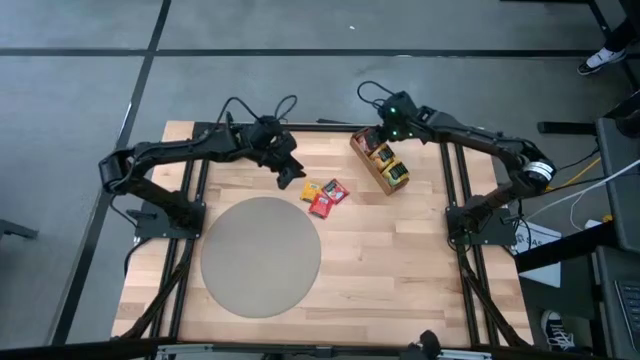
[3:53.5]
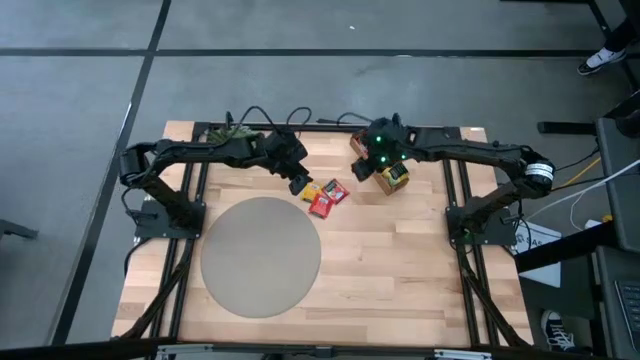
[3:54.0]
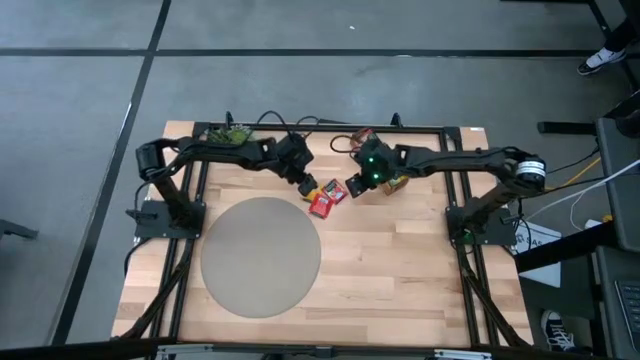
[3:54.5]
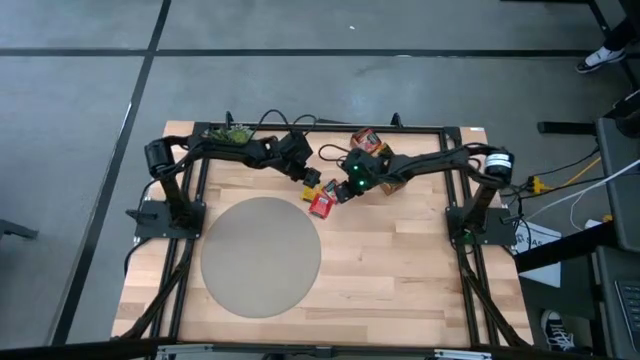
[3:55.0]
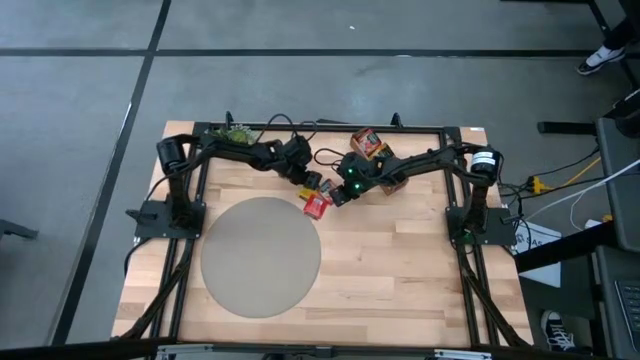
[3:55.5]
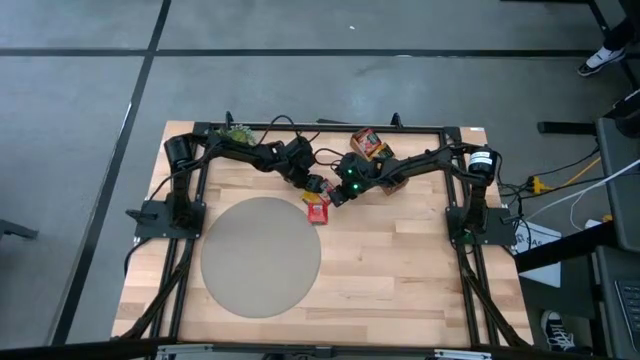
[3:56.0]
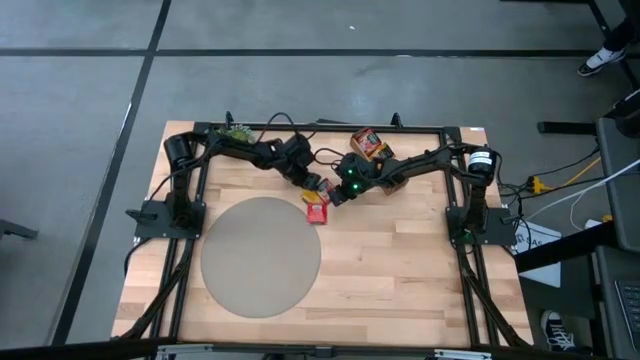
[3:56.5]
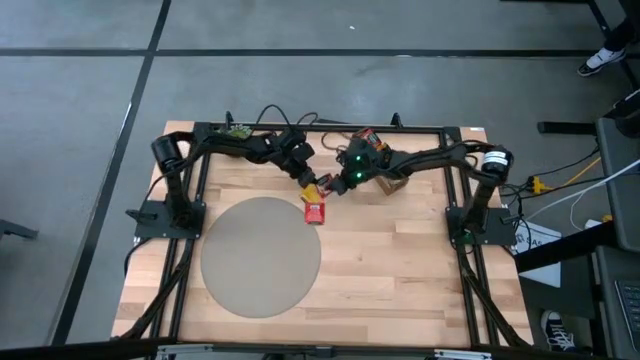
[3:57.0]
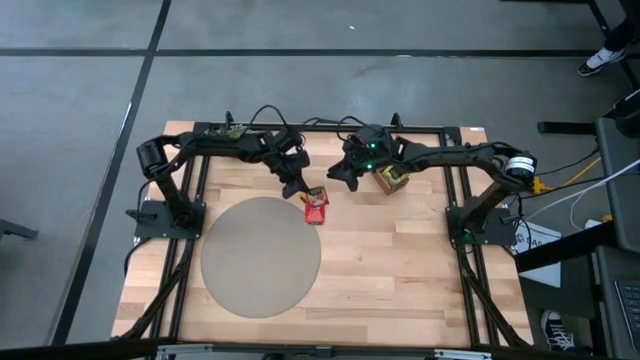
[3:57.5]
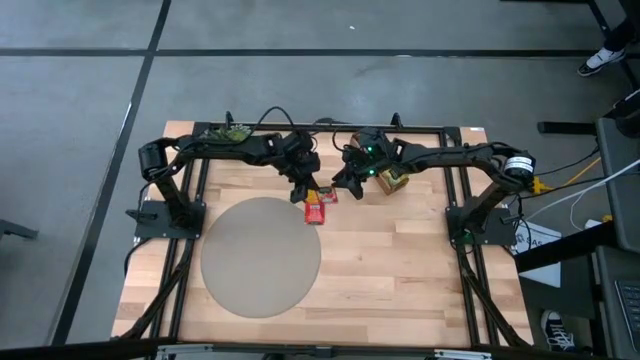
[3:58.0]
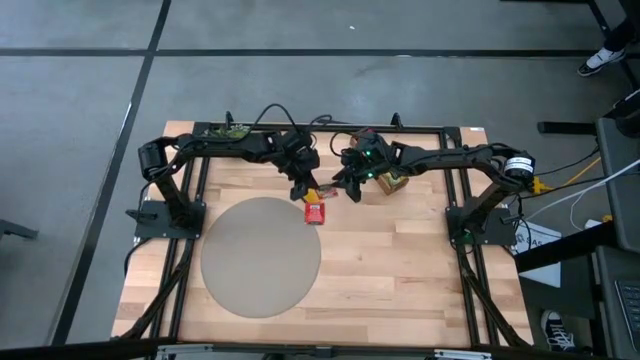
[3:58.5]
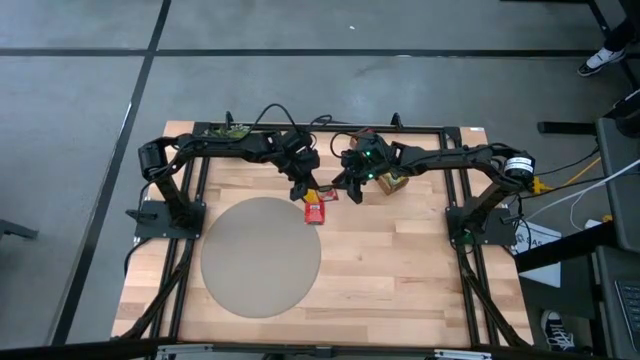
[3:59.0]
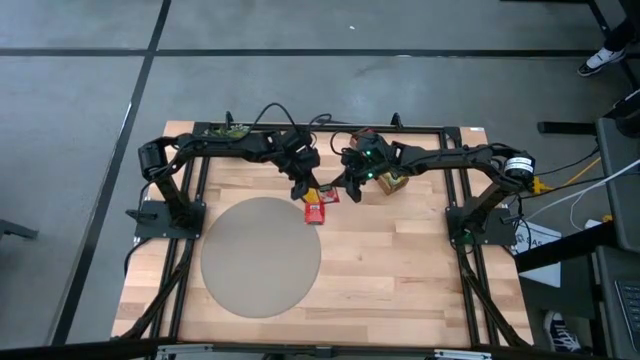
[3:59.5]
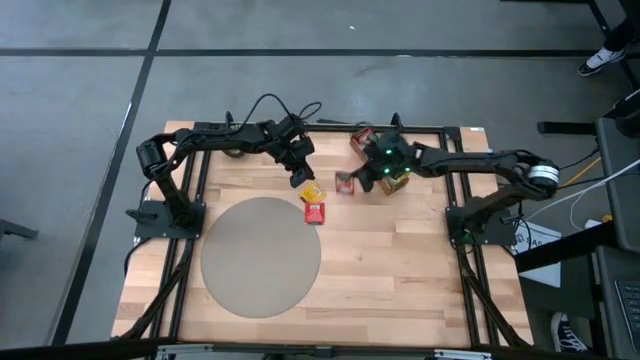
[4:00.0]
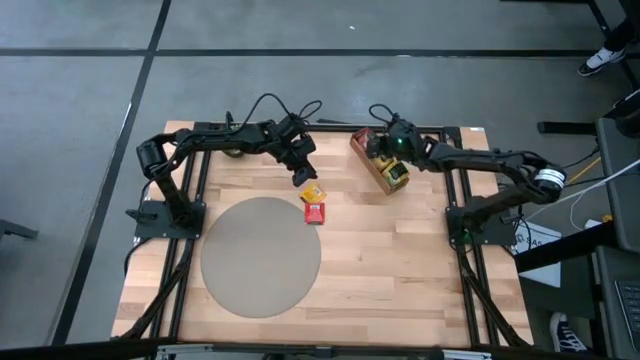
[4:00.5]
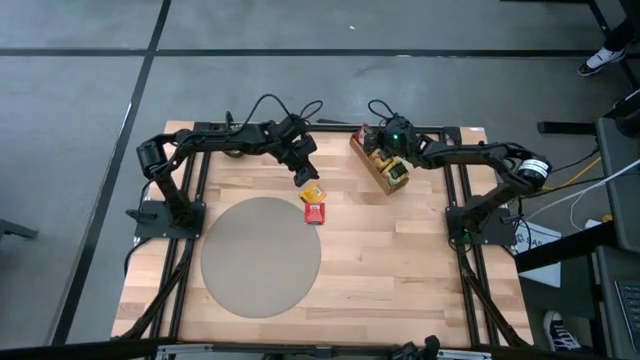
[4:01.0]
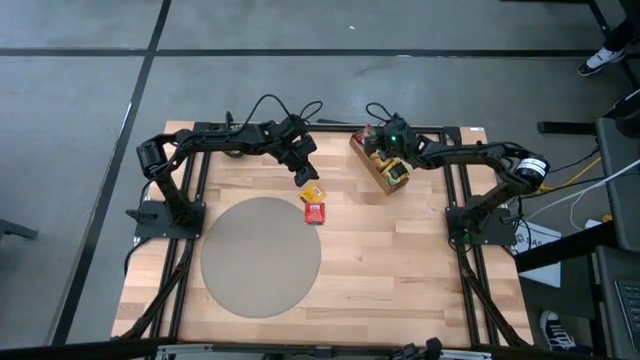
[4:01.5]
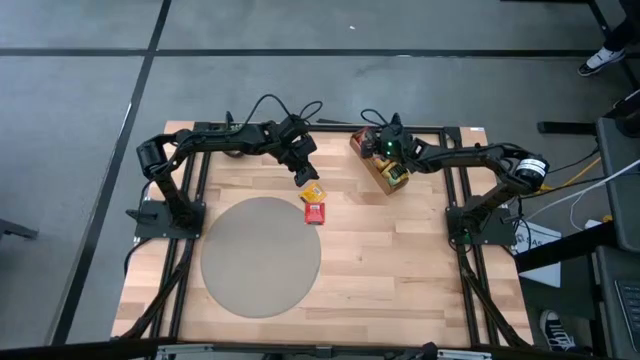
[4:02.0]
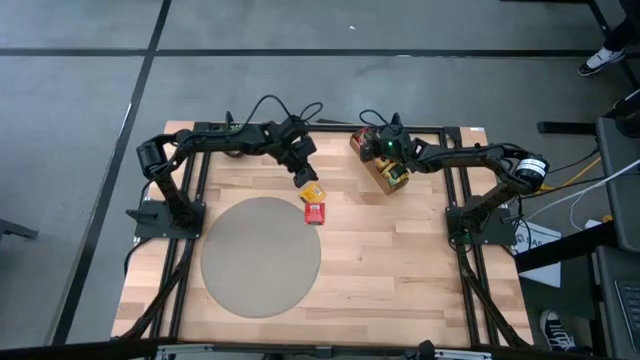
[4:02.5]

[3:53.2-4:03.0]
Task: Pick & Place Tea
Put the red tea bag into the top section of the wooden organizer

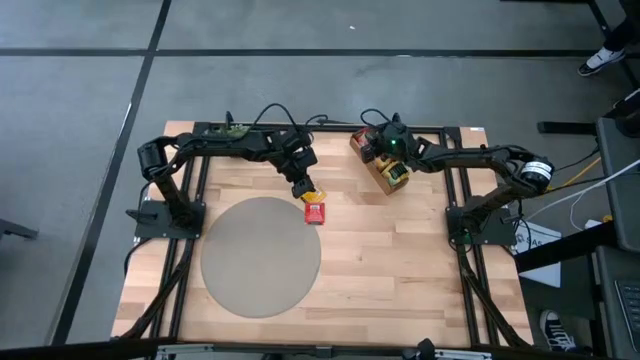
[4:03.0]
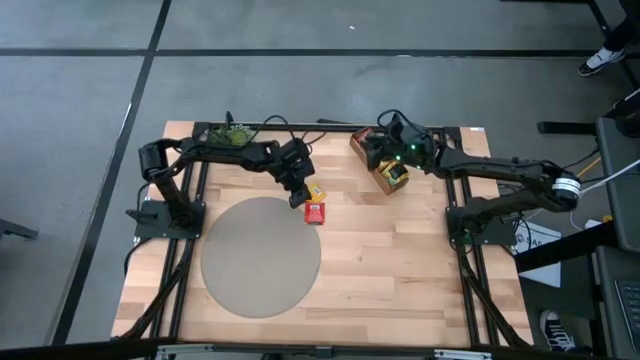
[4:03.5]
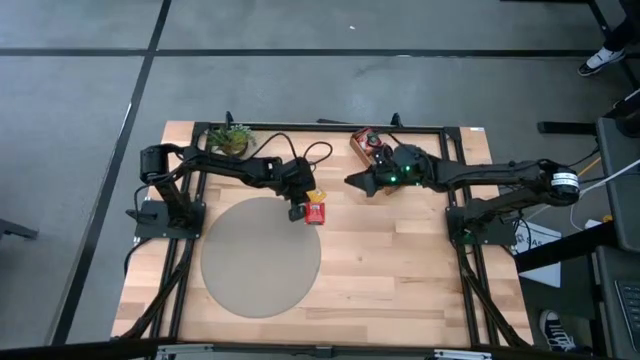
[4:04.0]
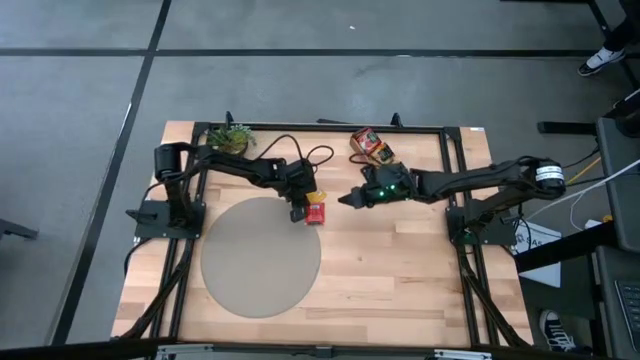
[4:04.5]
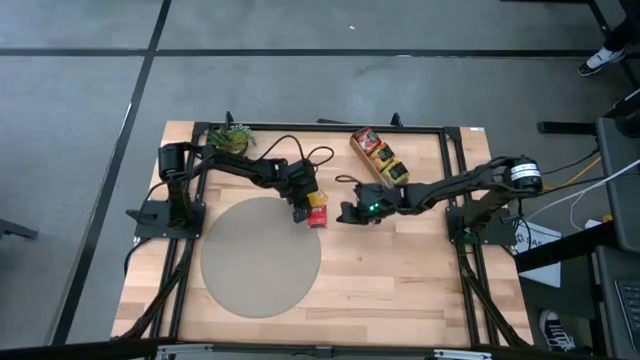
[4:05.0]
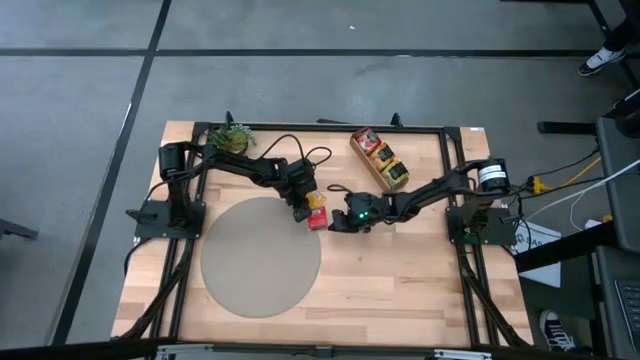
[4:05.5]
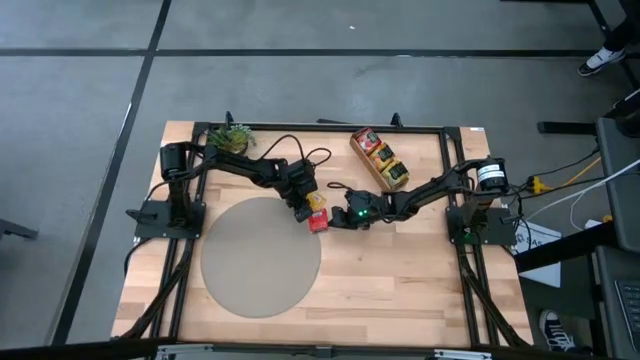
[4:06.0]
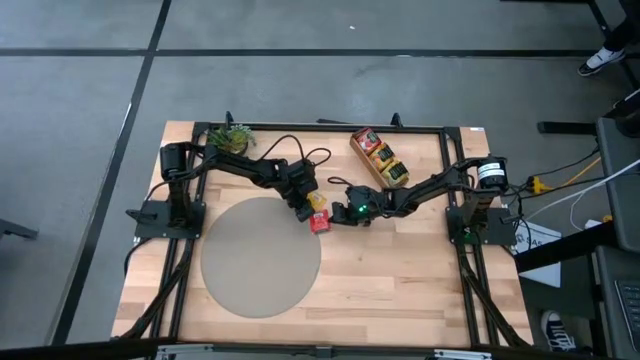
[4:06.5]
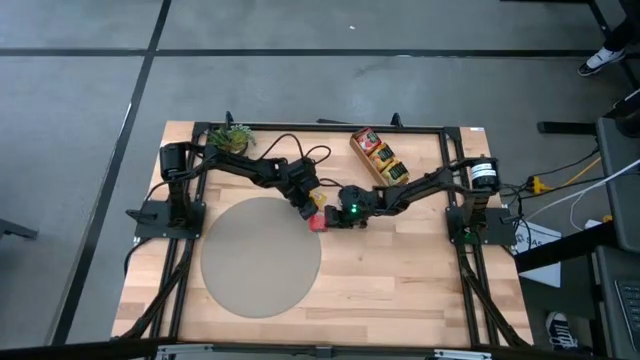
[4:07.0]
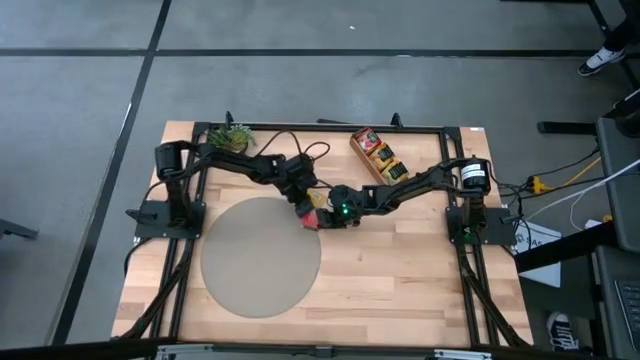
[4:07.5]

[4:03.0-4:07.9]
Put the red tea bag into the top section of the wooden organizer

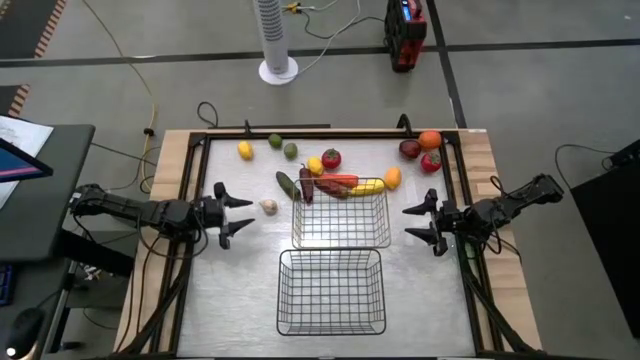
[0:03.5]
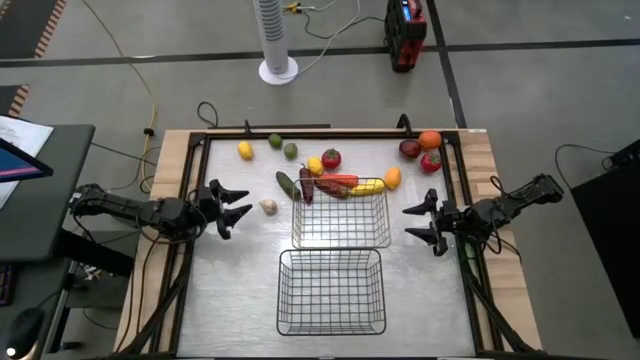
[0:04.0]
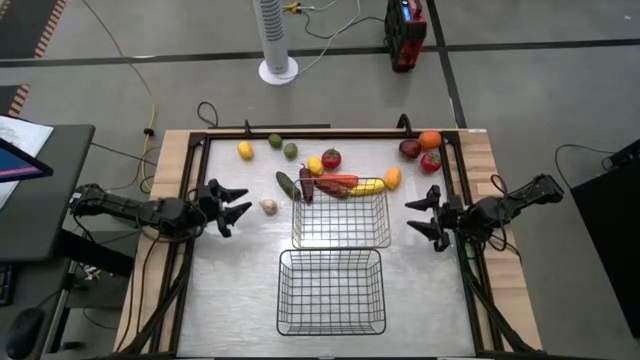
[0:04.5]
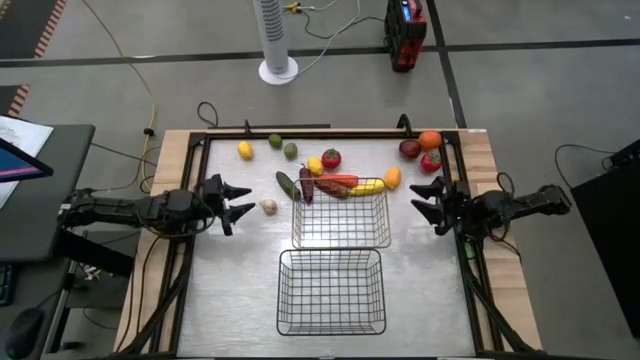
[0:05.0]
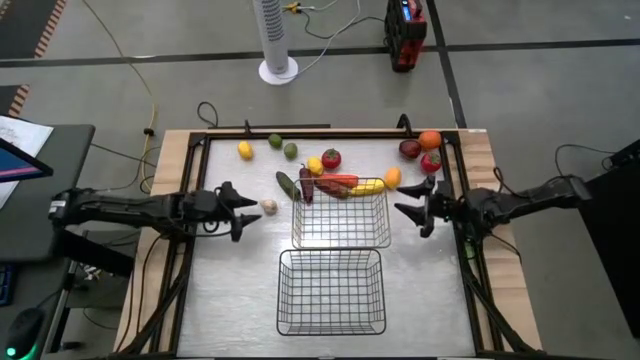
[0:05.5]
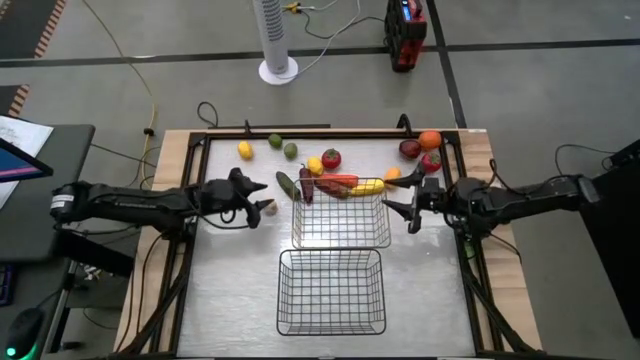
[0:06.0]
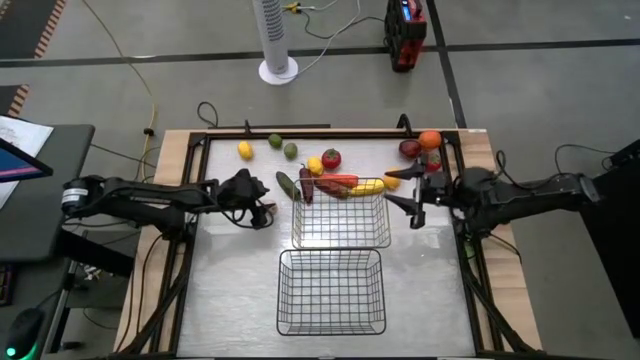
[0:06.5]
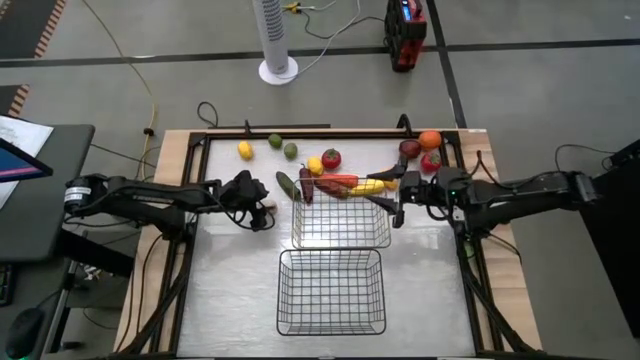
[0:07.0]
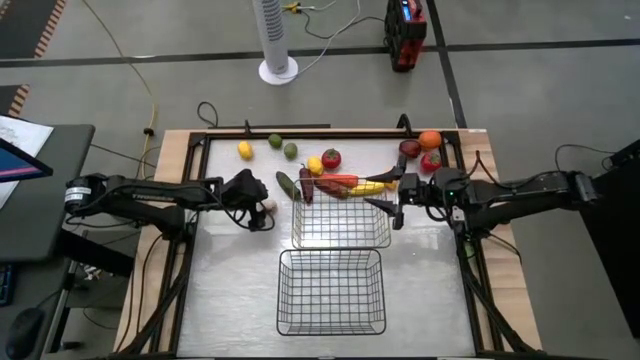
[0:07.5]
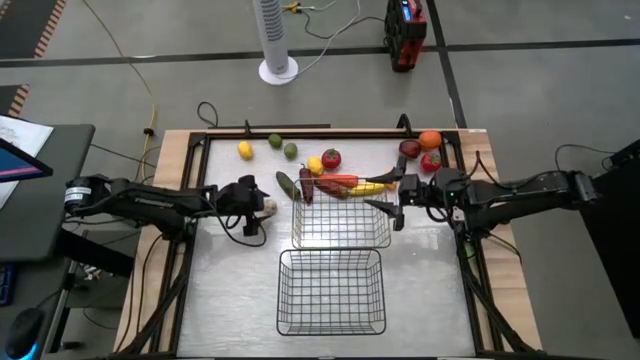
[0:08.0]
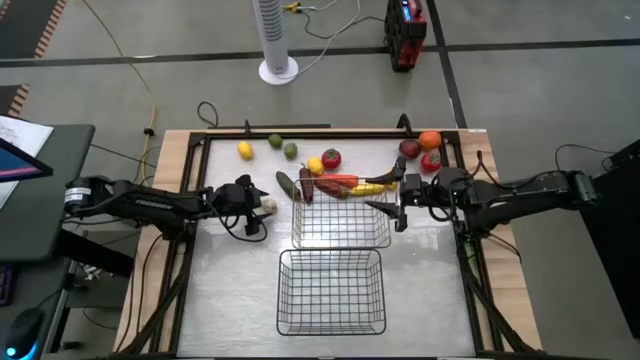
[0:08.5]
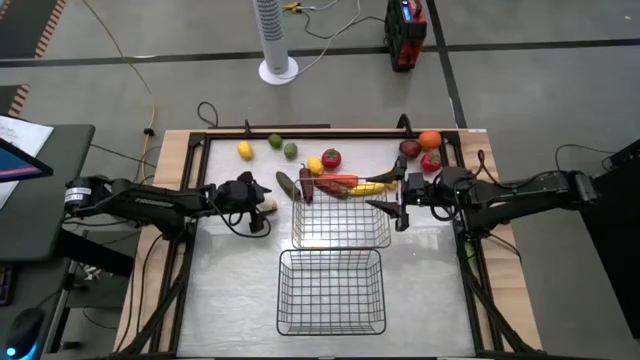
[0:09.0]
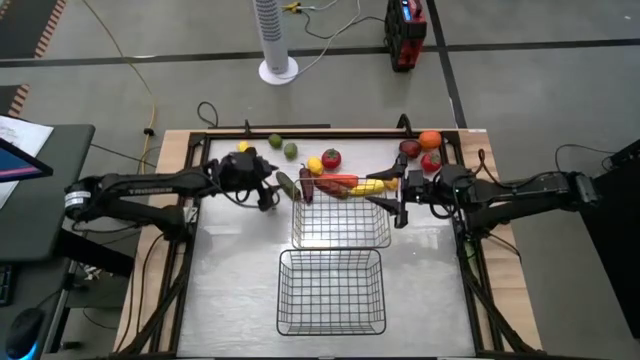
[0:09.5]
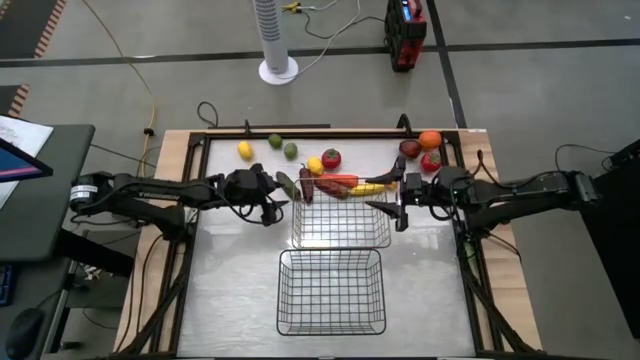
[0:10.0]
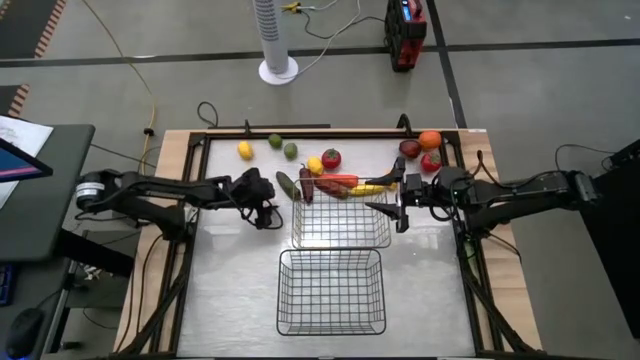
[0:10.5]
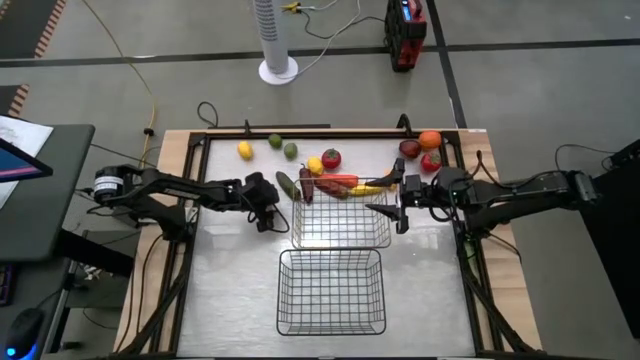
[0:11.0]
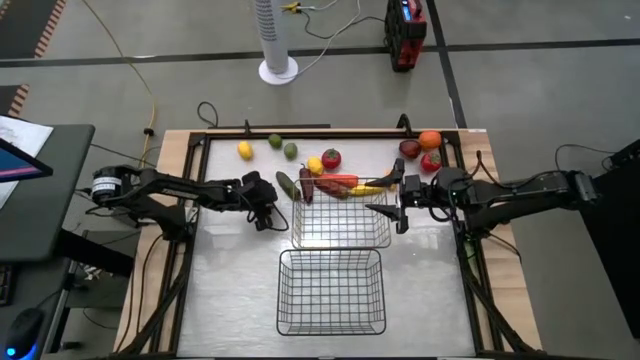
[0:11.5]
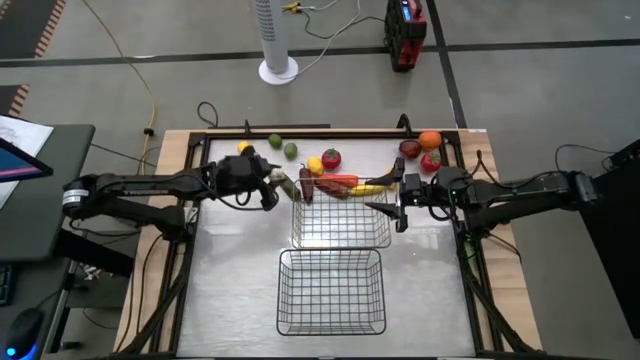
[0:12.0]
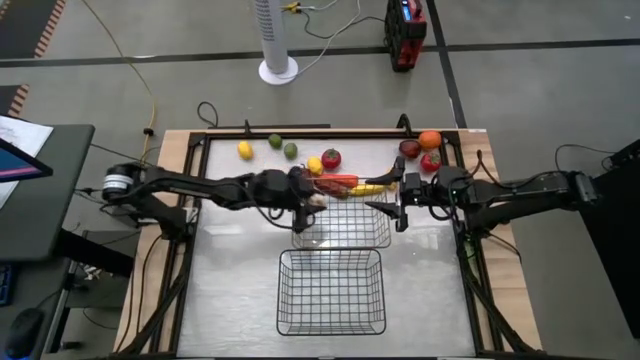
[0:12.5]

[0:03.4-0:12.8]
Task: Sort produce into baskets
Put the garlic into the top wire basket
